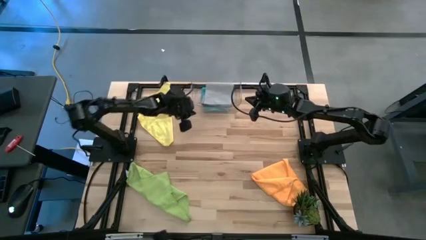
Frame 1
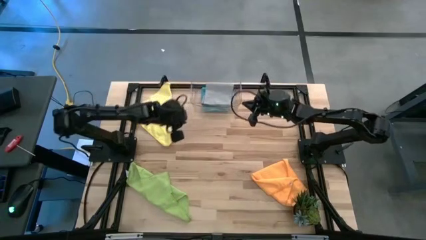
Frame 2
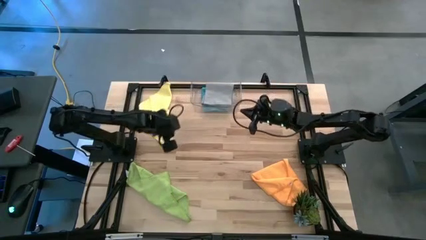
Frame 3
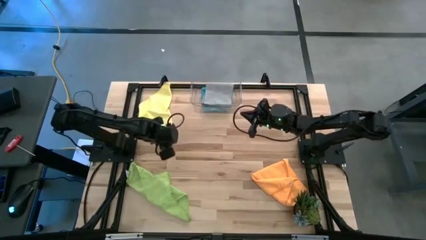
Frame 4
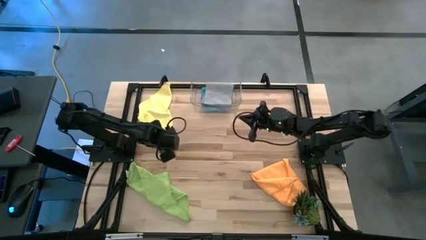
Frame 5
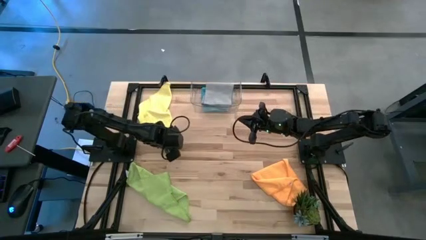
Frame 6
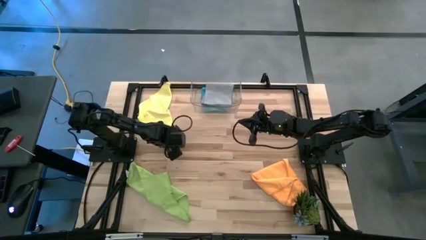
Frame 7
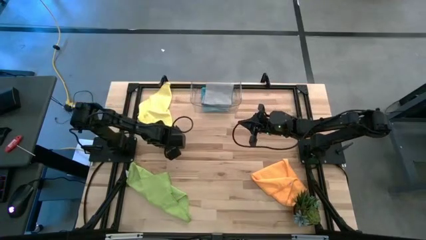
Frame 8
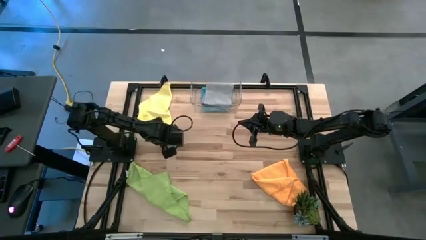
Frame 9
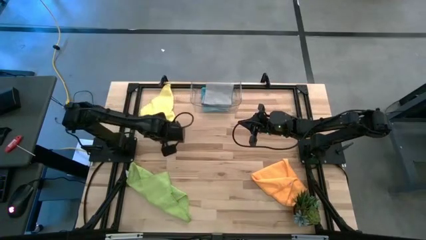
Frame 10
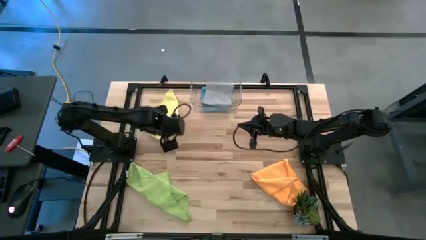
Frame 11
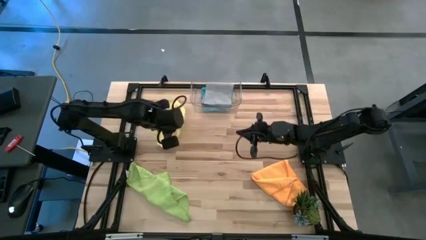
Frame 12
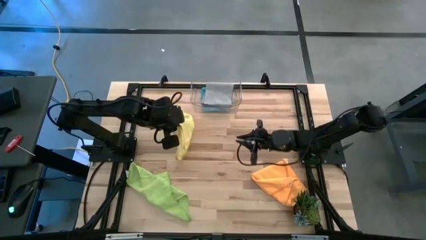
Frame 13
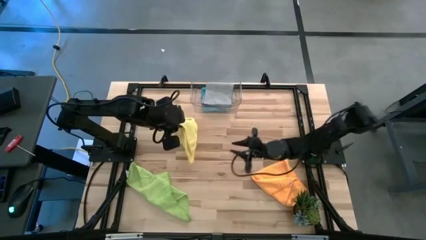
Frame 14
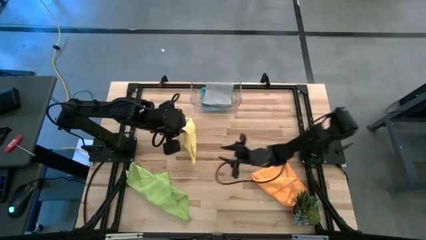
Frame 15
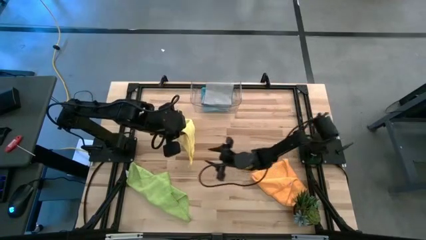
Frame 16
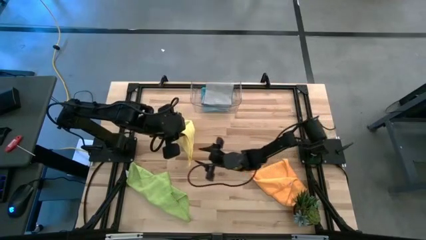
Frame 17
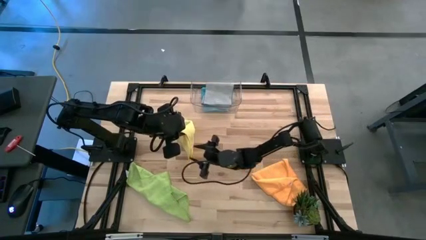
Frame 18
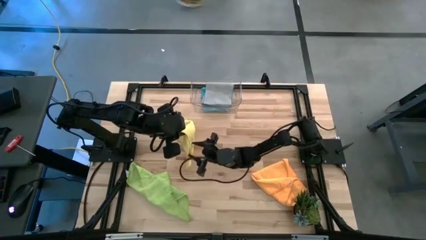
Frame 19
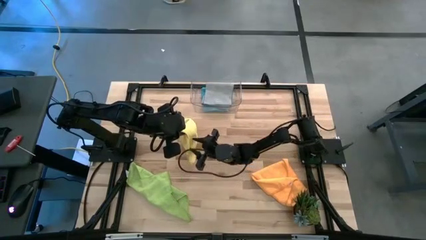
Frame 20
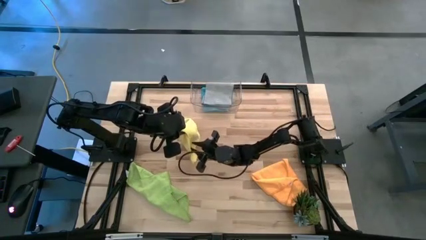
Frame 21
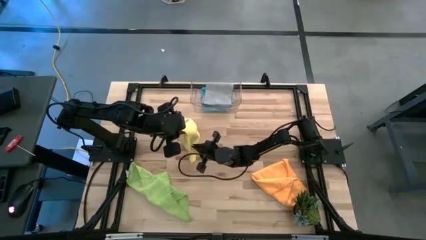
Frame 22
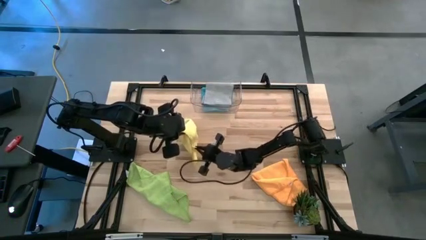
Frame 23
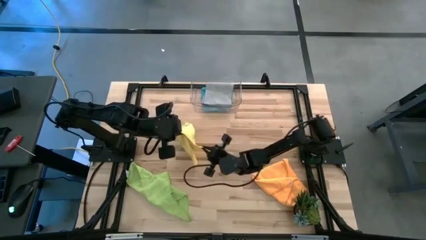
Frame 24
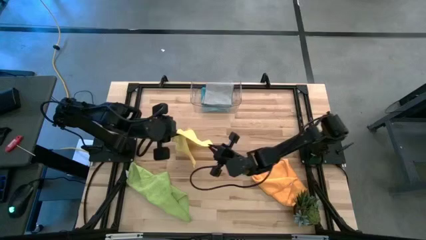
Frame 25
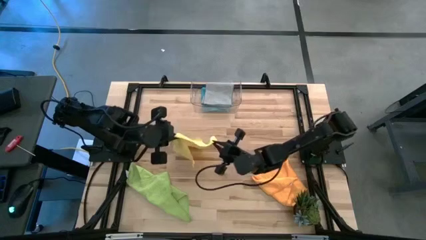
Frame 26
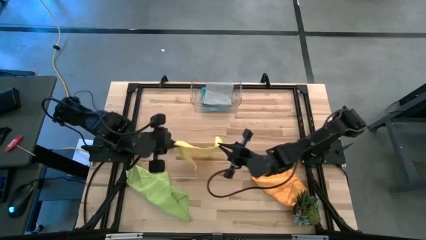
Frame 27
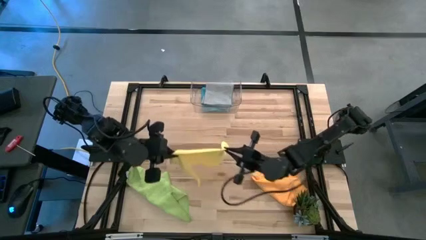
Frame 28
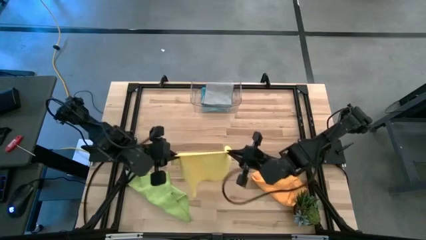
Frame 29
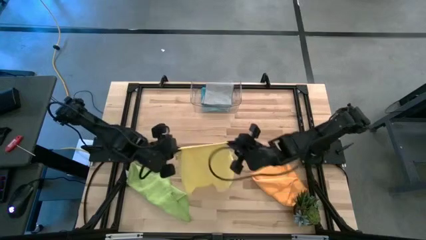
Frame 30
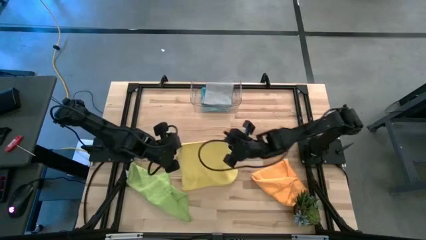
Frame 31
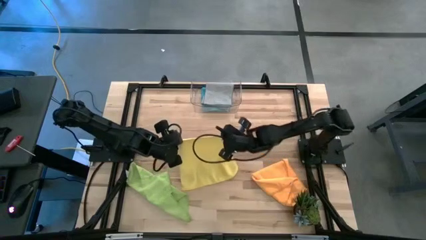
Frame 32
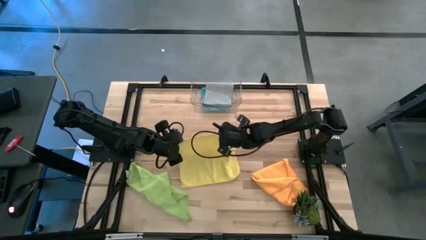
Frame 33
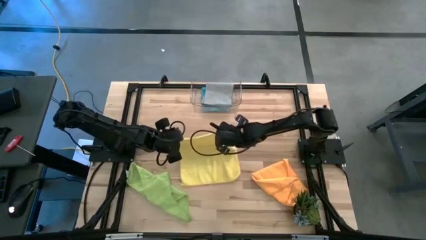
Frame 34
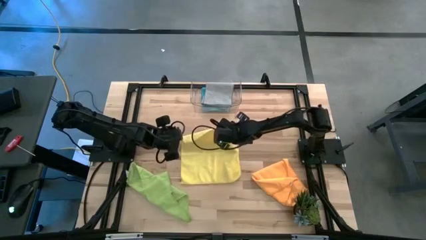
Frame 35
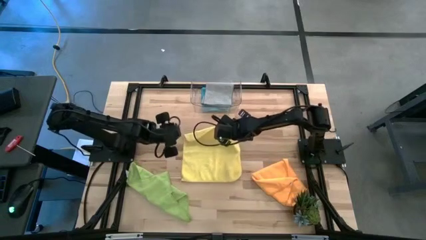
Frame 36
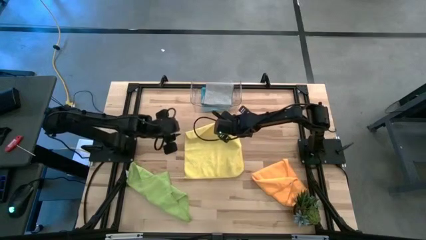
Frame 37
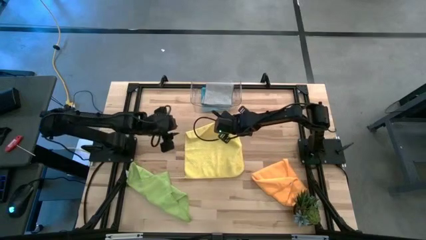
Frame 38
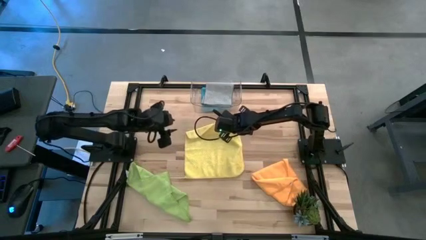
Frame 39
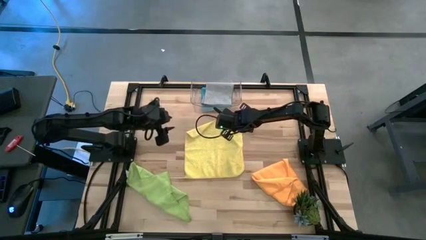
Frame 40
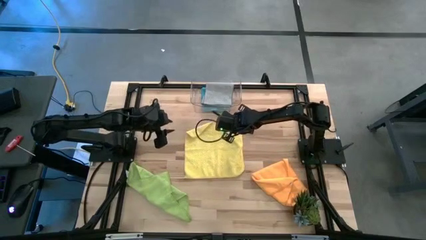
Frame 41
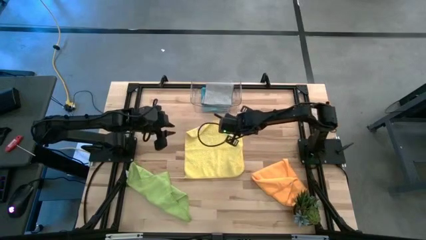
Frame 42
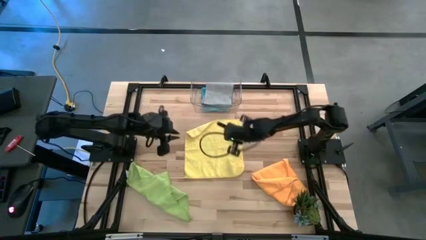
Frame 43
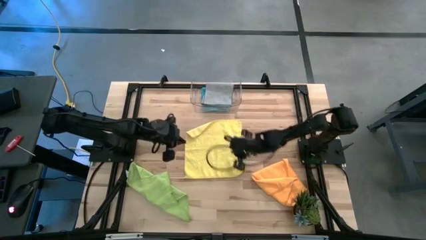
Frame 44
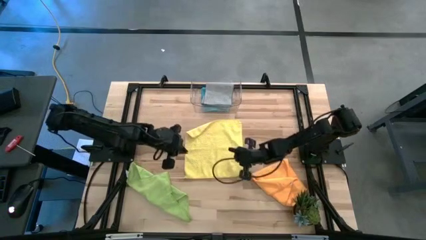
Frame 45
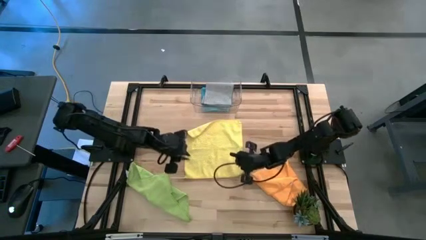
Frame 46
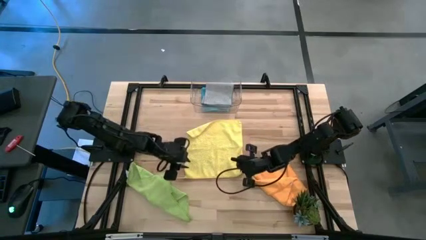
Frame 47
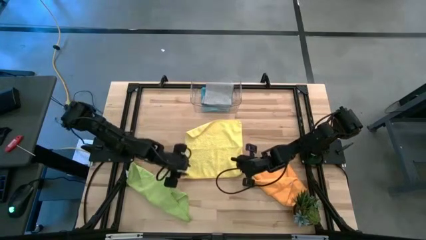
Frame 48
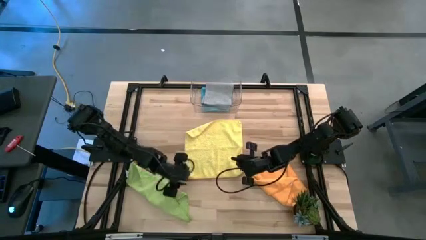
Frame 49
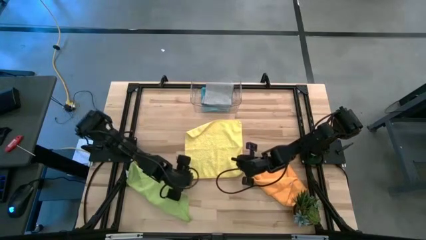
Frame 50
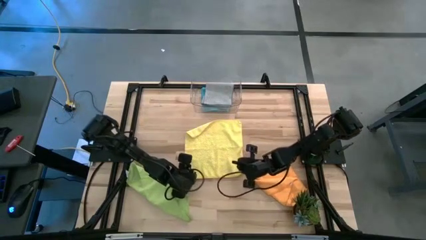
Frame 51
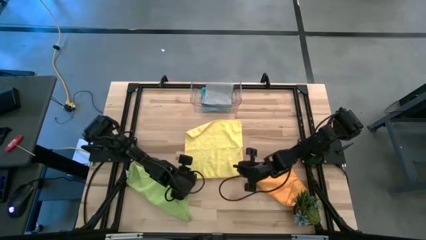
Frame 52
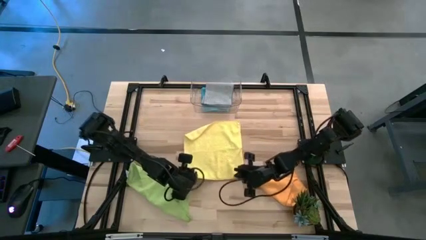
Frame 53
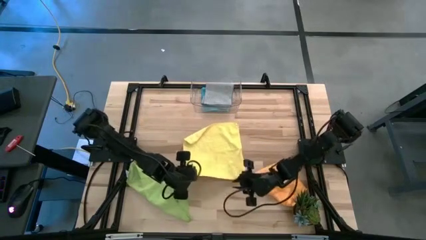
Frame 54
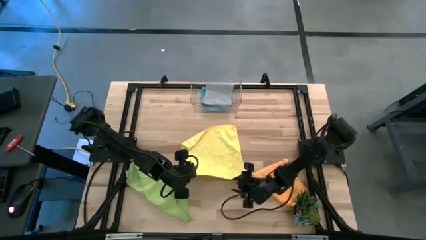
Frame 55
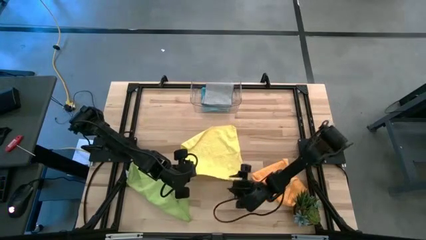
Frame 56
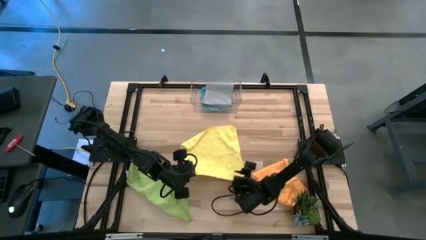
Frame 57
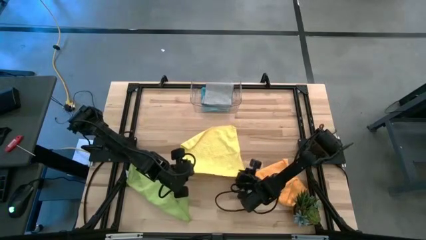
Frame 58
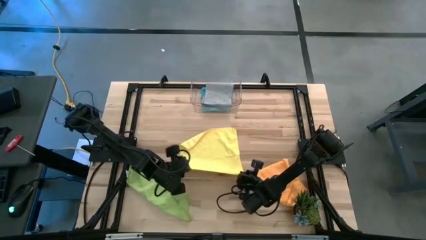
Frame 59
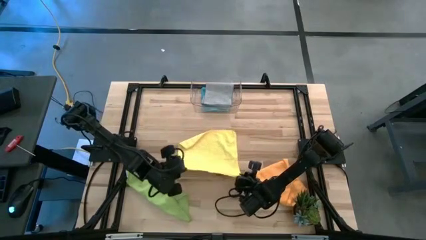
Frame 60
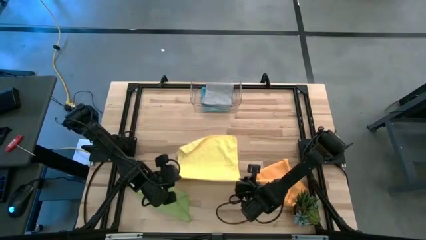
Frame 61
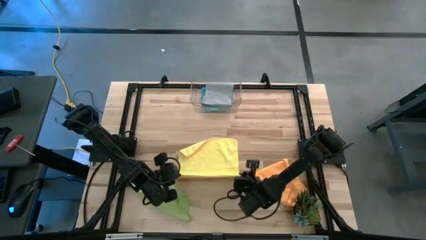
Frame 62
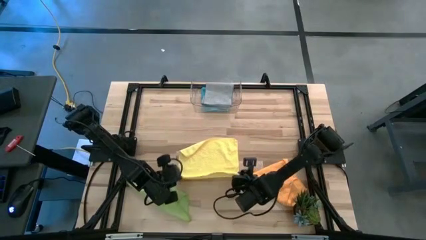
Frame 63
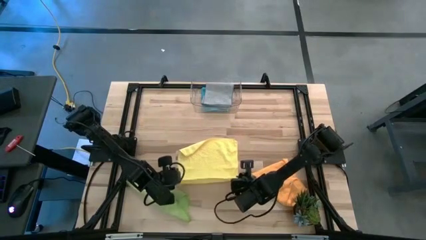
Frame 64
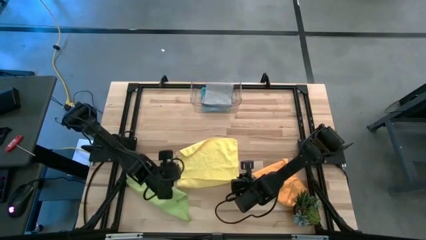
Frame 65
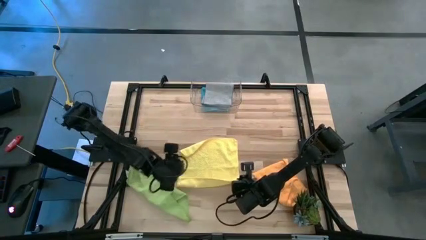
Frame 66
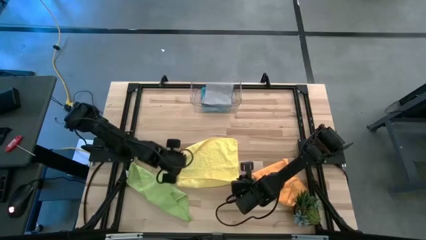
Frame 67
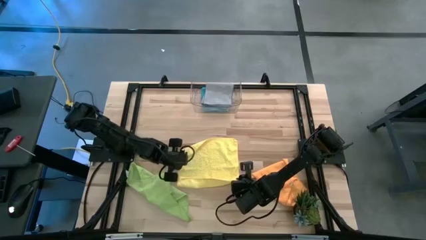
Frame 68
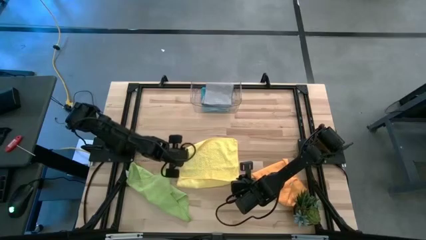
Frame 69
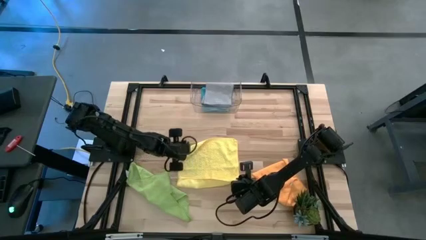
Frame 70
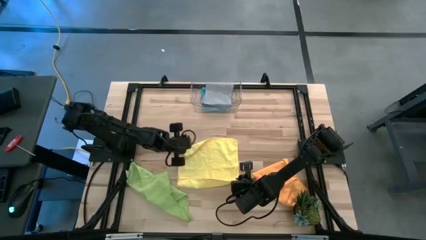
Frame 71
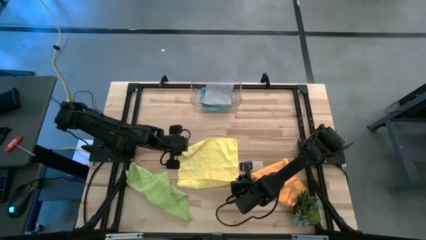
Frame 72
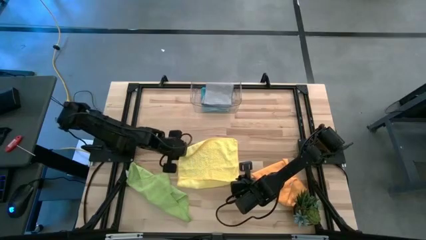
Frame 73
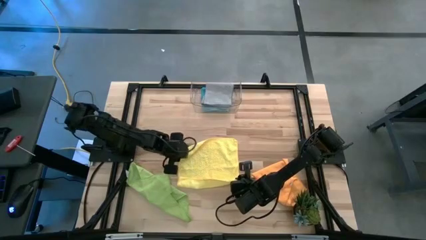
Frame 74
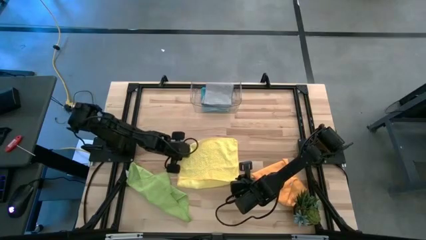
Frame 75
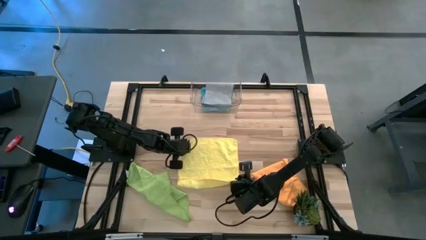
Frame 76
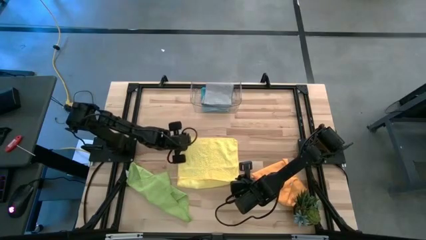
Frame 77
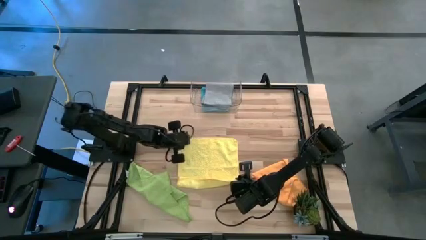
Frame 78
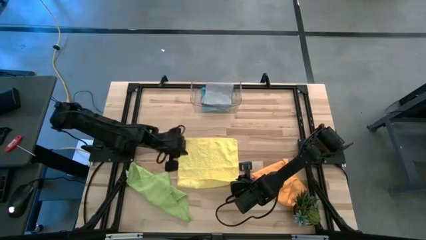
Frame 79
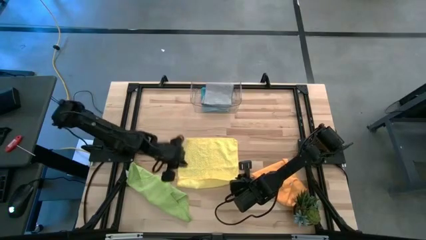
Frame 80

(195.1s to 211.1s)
Task: Fold microfiber towels
Fold the yellow towel
